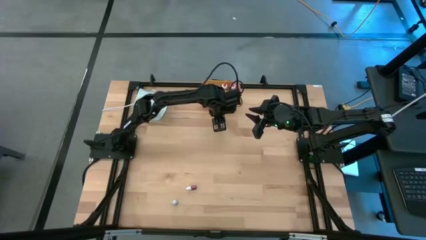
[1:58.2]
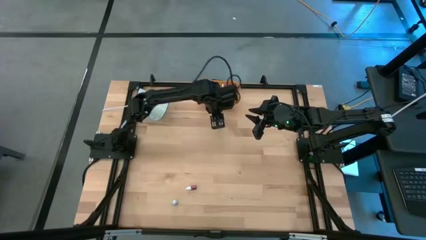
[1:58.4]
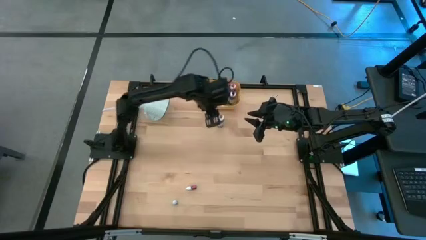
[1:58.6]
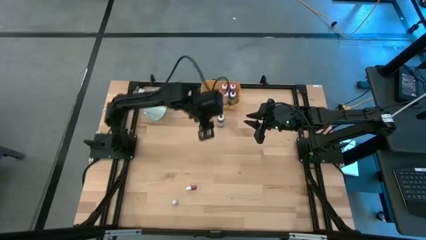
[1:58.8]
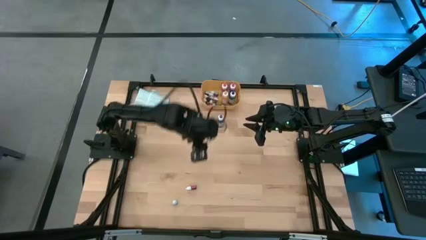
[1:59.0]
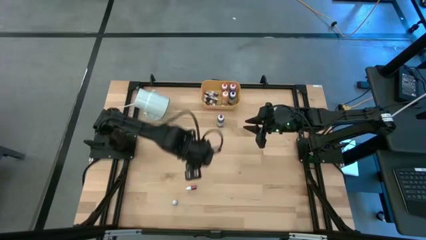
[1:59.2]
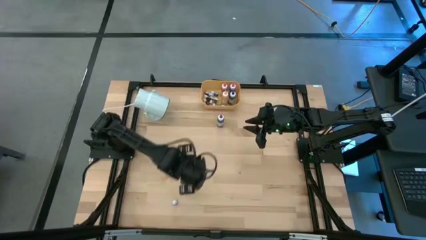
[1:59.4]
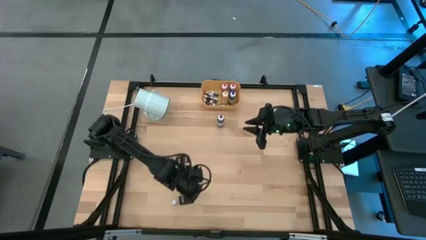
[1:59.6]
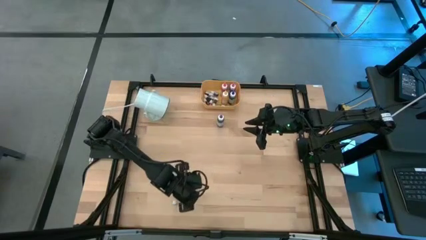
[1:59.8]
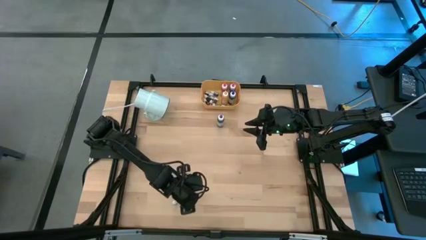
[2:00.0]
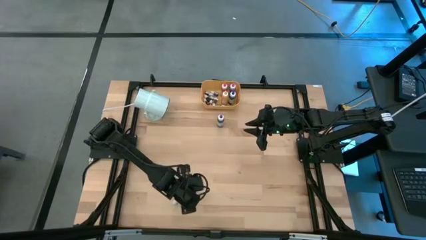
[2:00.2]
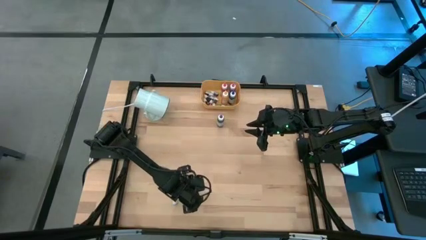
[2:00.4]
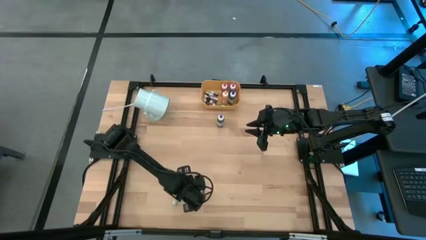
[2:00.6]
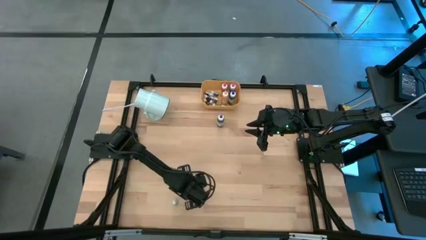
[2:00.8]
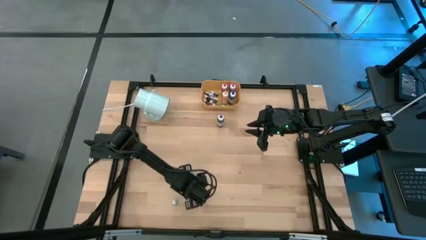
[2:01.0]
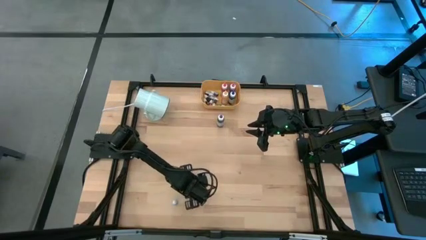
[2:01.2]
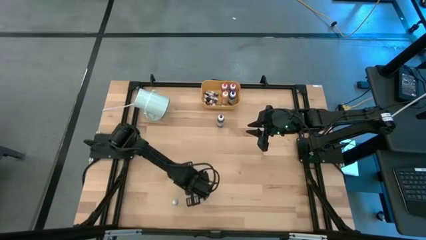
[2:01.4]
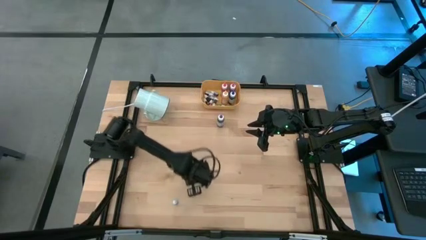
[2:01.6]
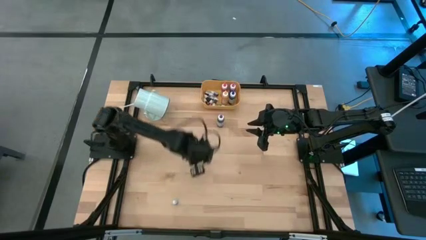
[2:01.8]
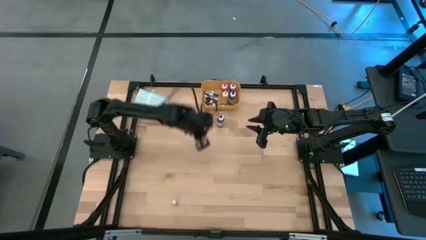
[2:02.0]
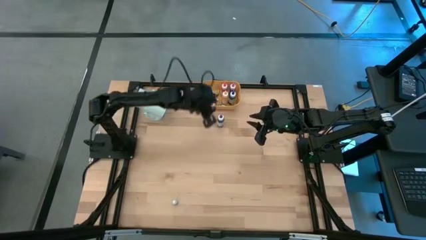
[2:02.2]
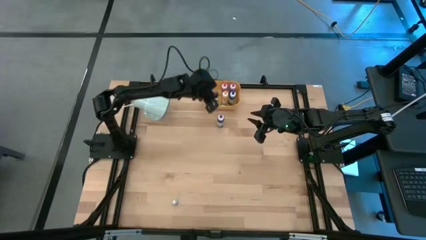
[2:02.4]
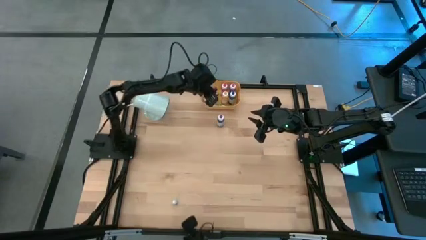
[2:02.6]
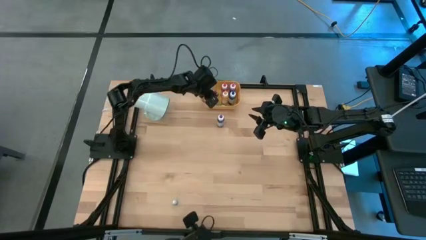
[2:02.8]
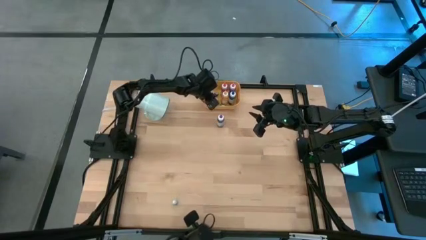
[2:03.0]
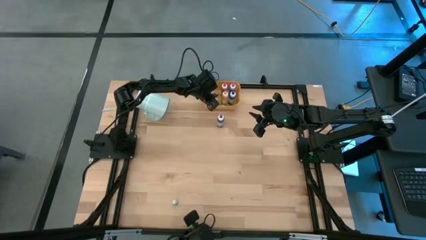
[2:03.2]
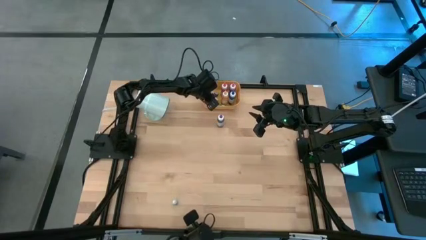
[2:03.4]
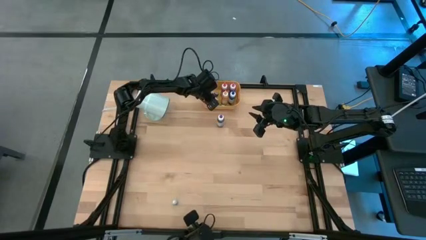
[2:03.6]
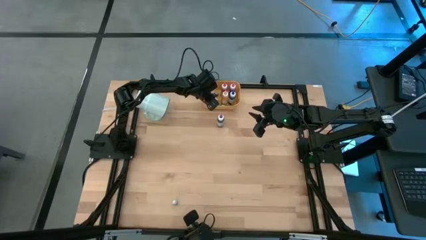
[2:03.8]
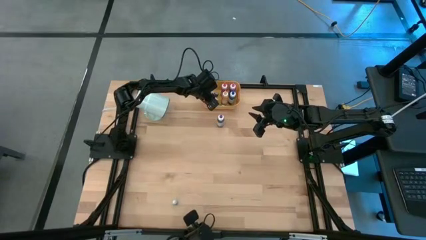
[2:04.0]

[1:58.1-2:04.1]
Task: Pick & Place food coloring
Put the pink food coloring bottle into the yellow bin

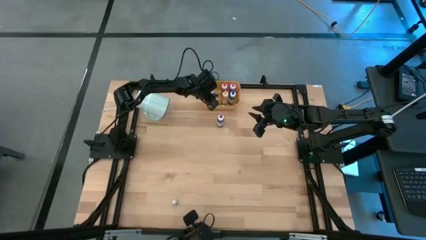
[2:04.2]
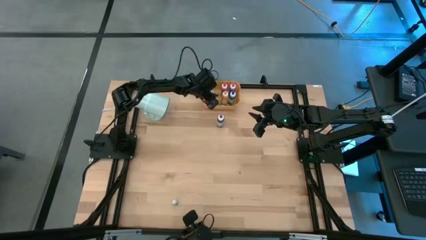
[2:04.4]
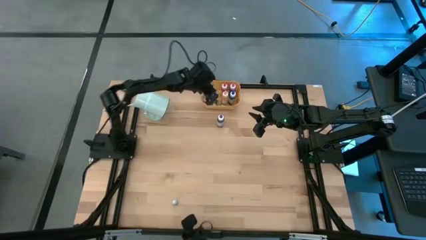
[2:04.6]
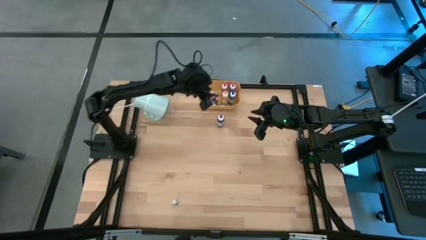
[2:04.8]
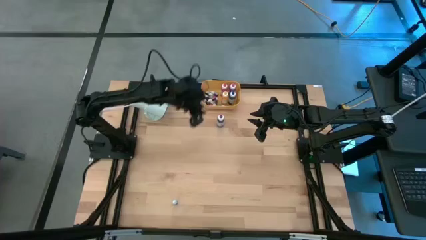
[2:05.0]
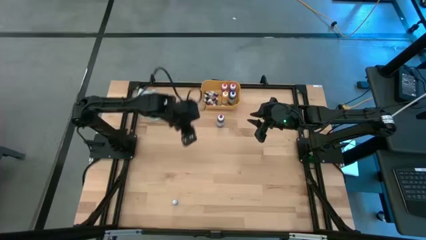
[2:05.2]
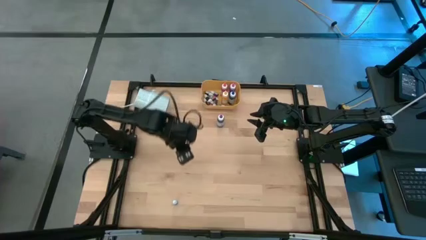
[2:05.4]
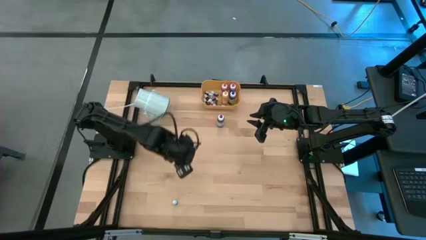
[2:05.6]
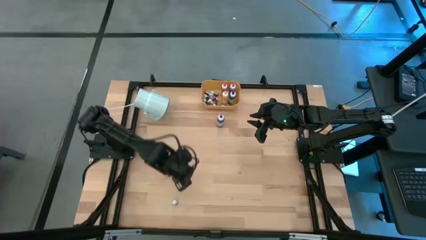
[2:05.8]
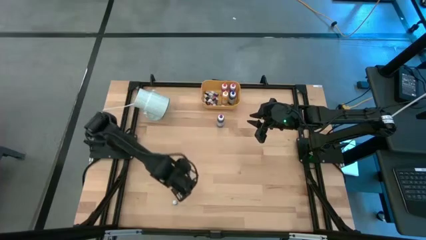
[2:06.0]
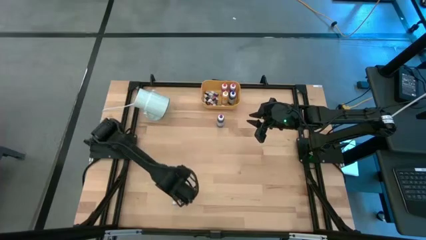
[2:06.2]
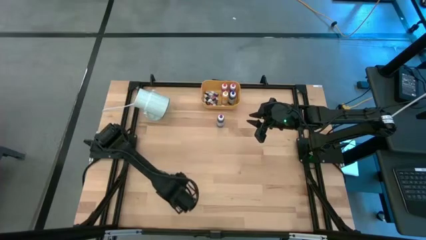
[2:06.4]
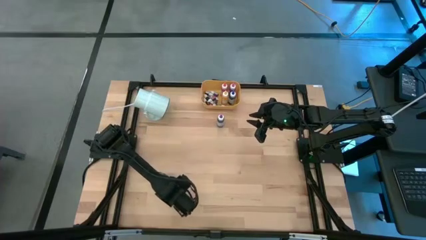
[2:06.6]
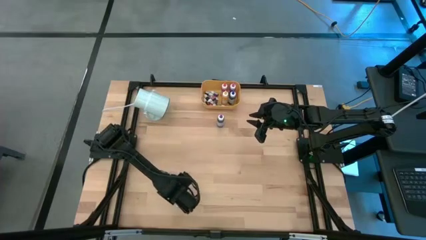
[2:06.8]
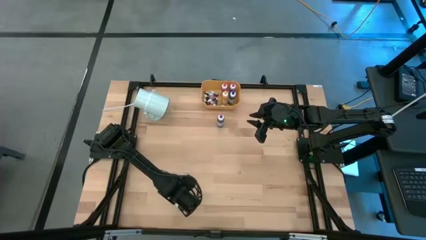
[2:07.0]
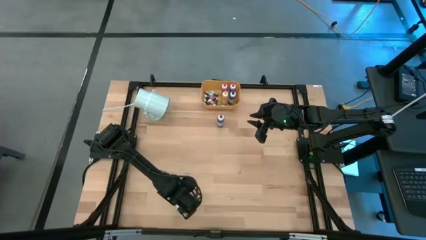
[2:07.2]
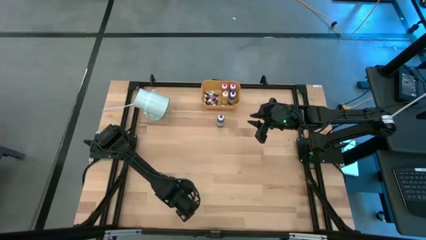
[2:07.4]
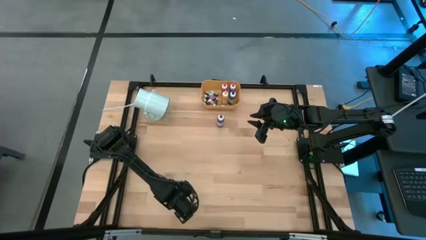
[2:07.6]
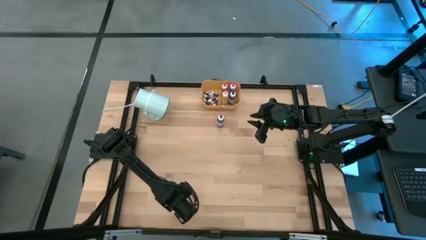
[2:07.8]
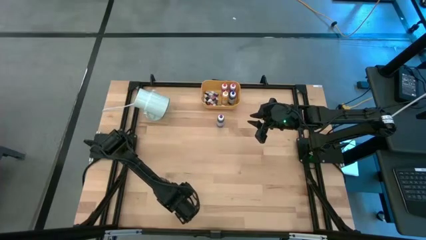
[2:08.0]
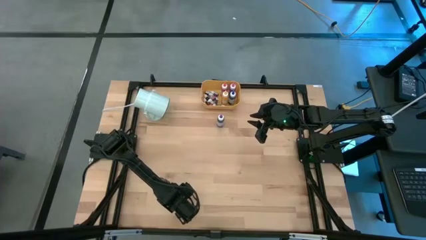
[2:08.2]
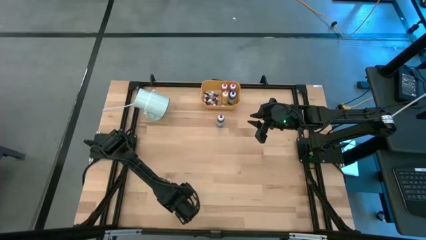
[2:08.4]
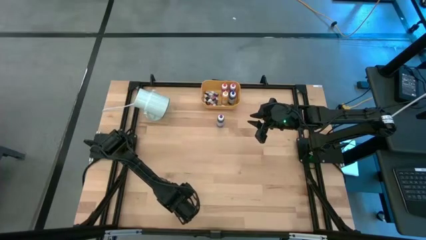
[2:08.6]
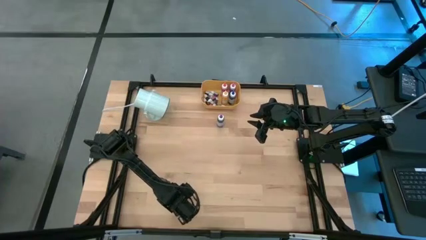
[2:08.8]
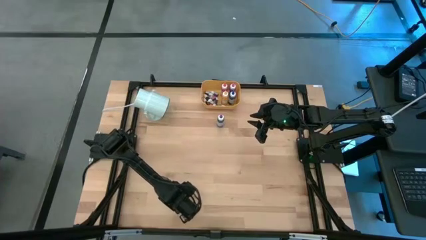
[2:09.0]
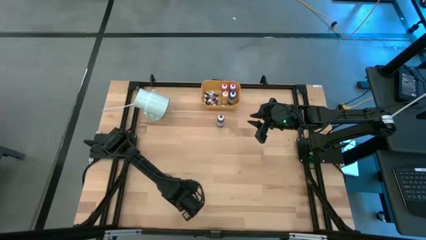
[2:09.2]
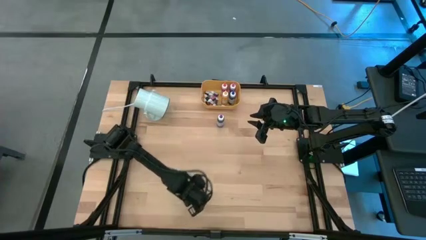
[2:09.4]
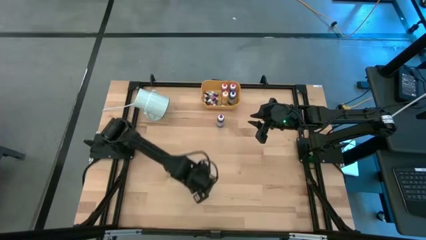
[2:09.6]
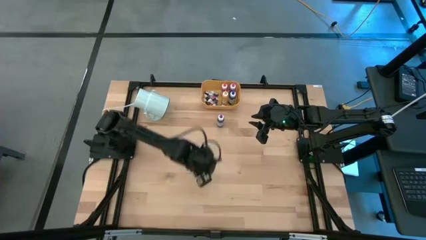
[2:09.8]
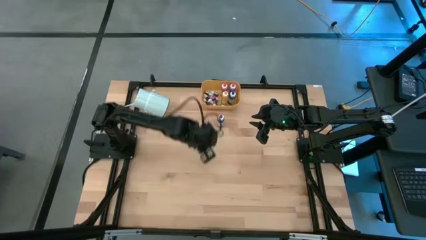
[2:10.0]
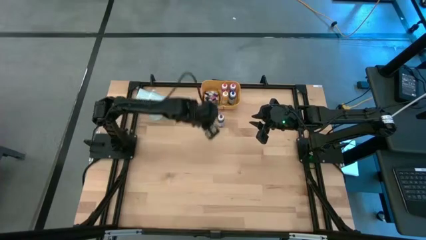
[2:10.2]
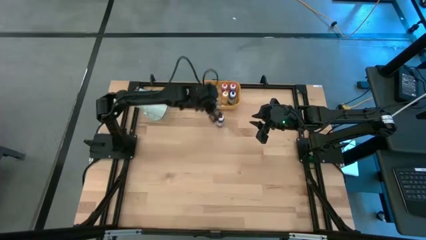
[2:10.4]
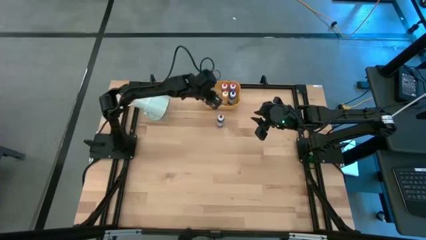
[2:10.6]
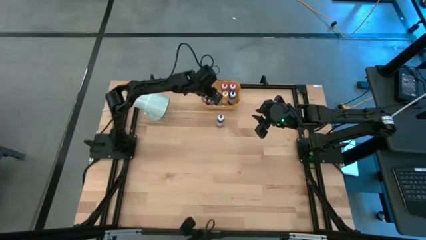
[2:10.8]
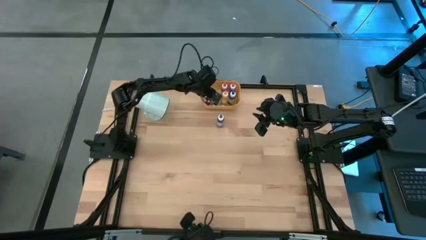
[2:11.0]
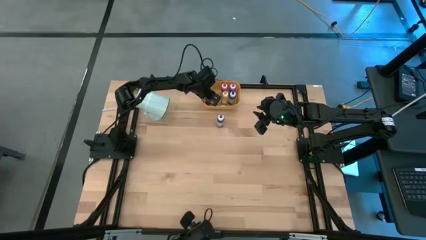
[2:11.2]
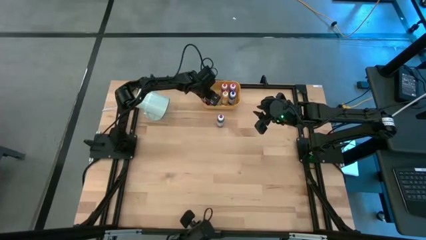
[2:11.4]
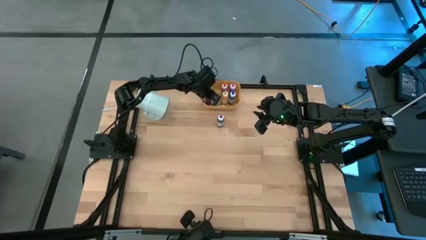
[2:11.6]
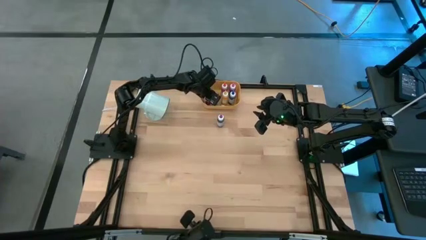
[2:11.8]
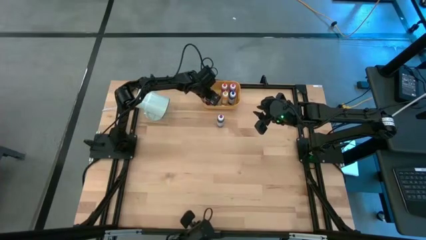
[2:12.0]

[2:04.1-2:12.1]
Put the black food coloring bottle into the yellow bin

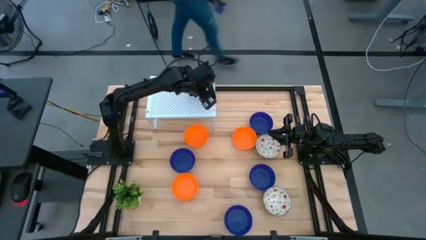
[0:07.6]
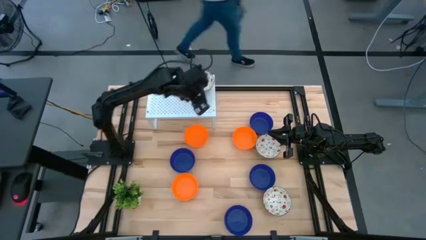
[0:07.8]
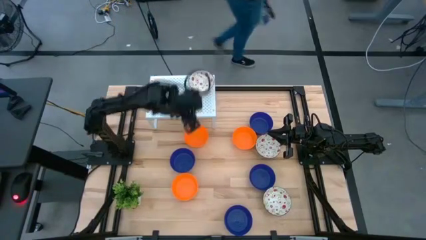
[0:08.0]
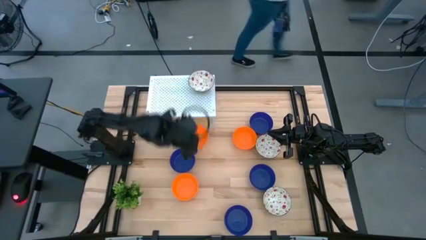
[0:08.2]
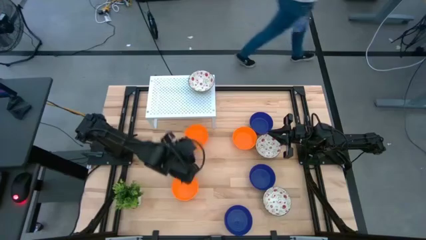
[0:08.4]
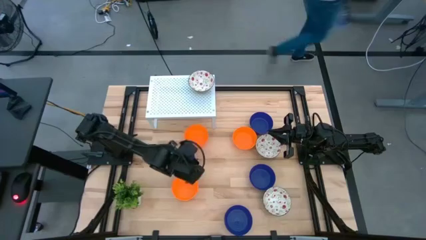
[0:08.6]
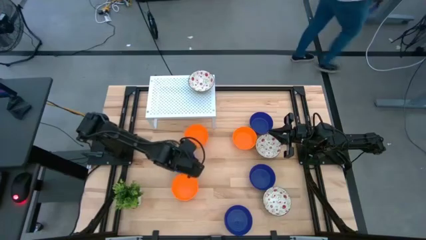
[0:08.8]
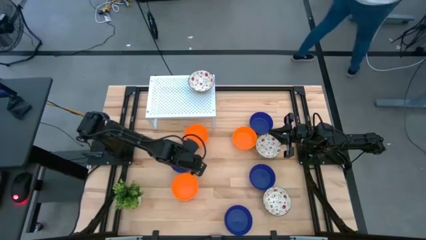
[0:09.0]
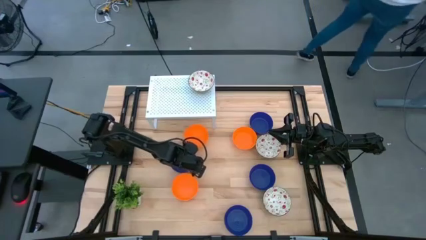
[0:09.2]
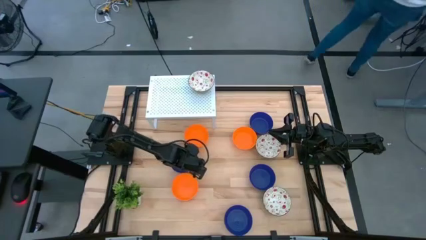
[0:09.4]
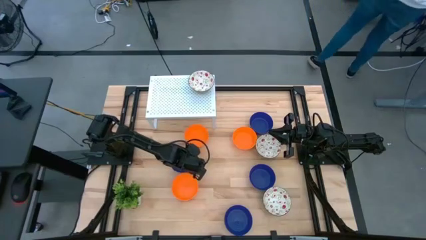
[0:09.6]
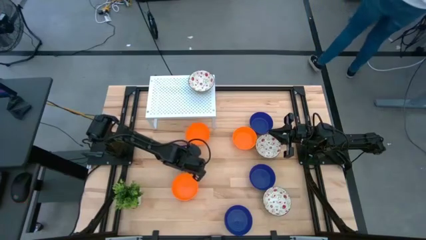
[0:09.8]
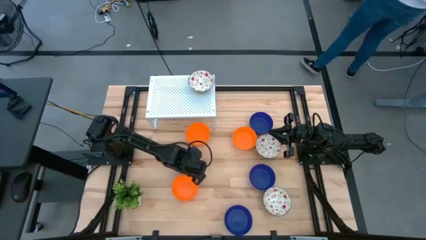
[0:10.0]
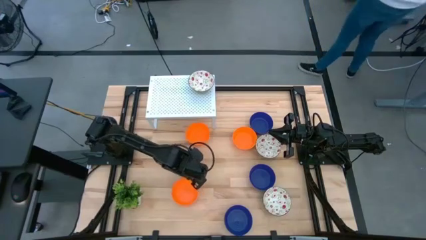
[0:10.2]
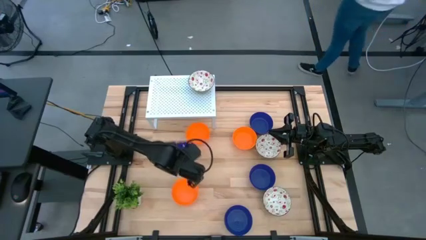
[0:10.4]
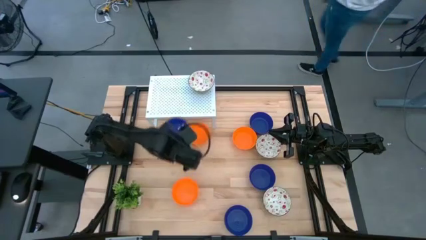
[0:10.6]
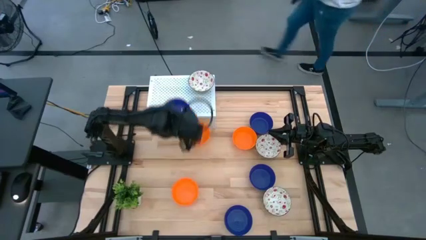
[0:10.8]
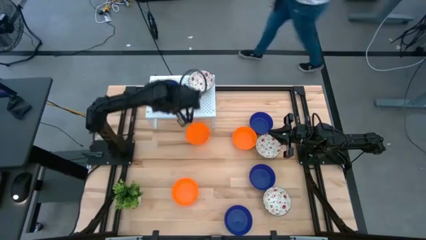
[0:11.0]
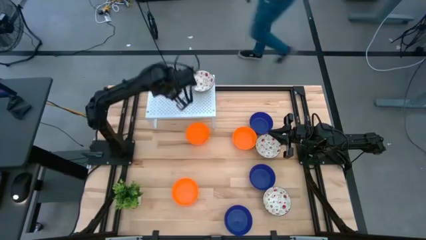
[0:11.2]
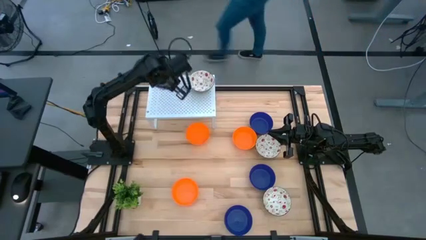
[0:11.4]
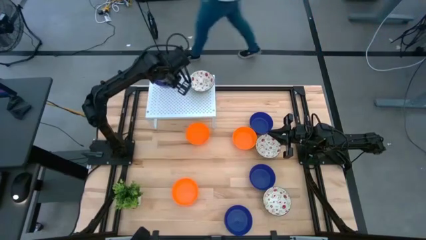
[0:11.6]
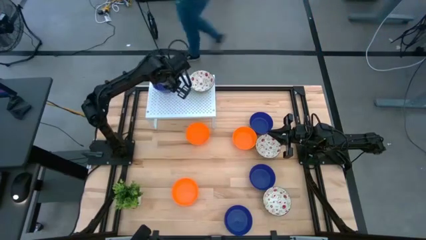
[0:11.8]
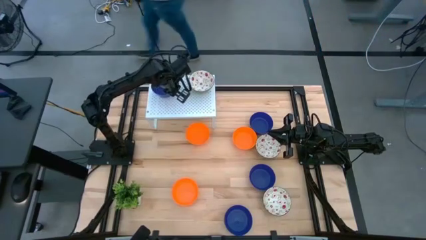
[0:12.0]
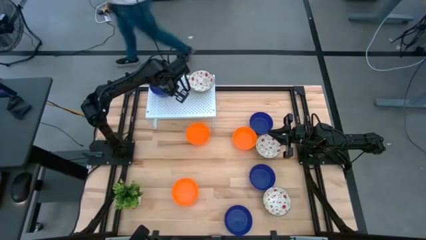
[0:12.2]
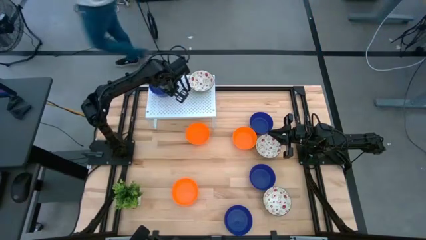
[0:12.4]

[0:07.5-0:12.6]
Task: Pick & Place Mini bowls
Put the blue bowl on the shelf
